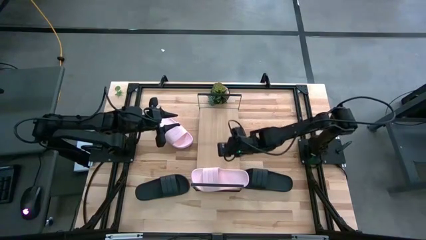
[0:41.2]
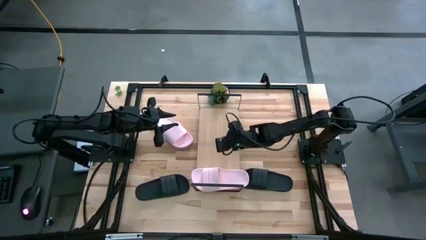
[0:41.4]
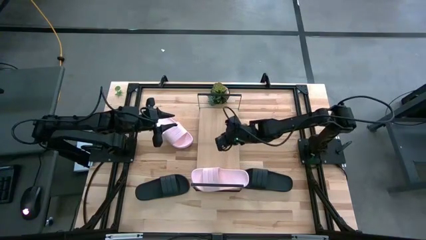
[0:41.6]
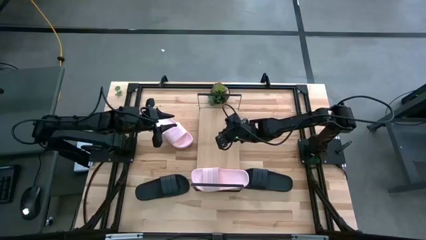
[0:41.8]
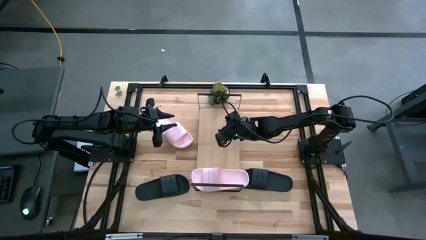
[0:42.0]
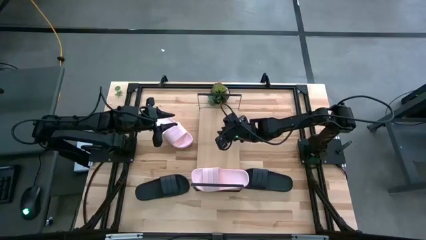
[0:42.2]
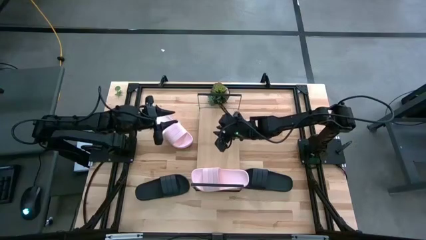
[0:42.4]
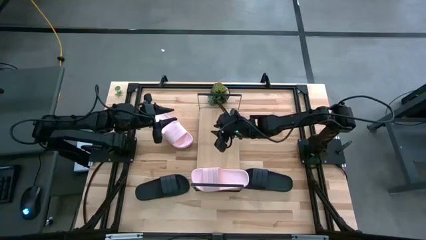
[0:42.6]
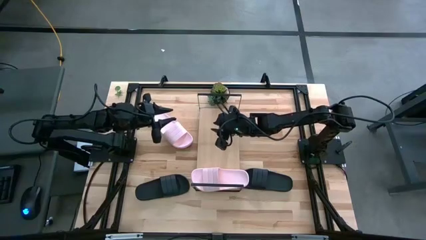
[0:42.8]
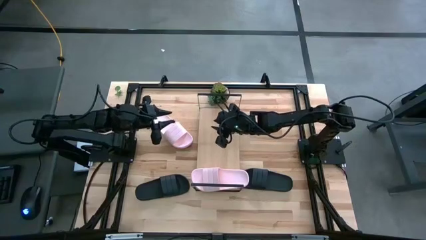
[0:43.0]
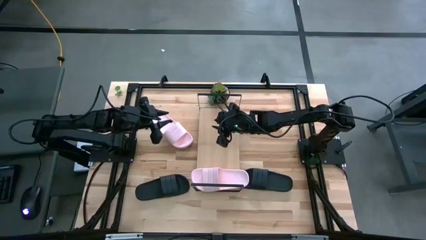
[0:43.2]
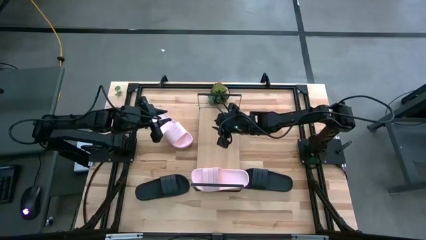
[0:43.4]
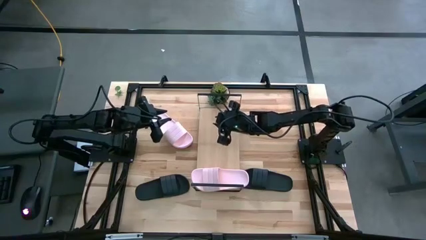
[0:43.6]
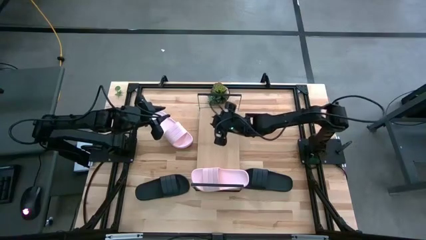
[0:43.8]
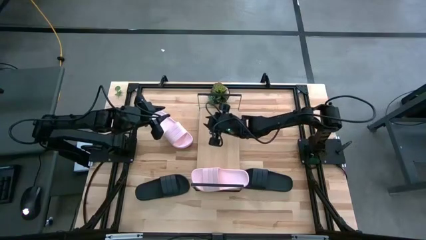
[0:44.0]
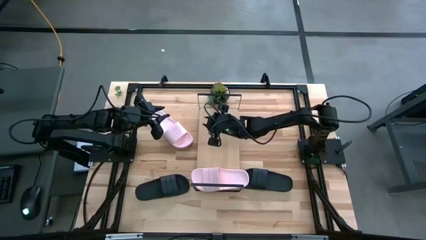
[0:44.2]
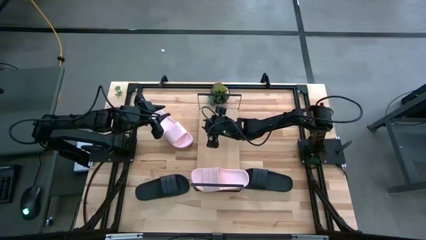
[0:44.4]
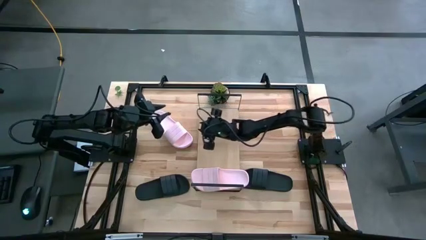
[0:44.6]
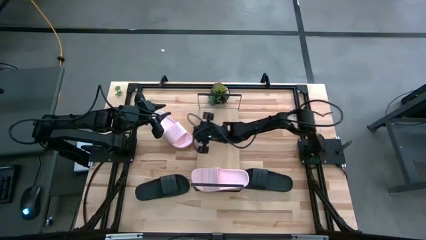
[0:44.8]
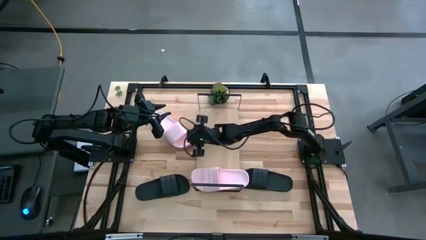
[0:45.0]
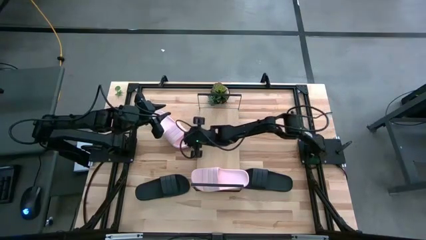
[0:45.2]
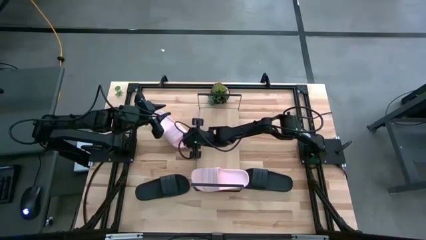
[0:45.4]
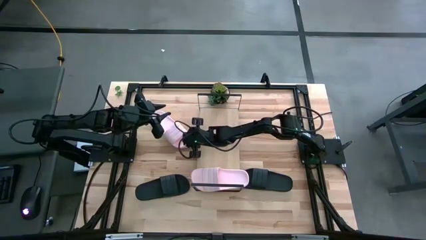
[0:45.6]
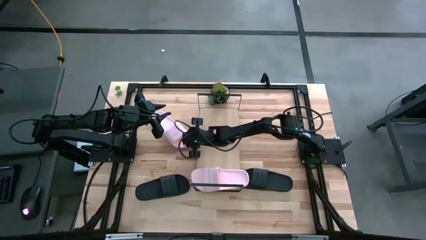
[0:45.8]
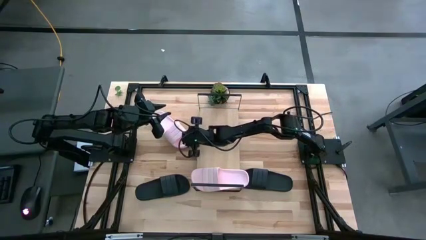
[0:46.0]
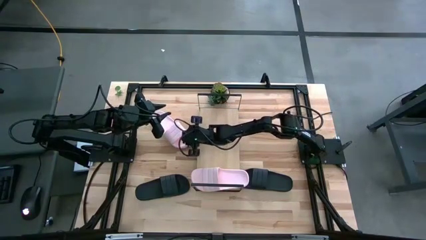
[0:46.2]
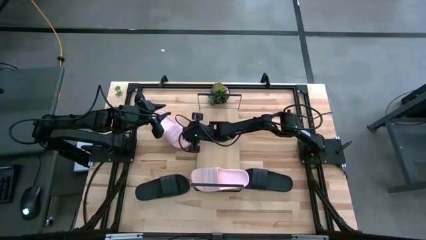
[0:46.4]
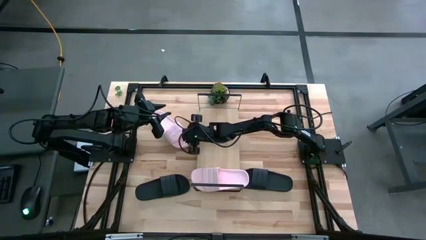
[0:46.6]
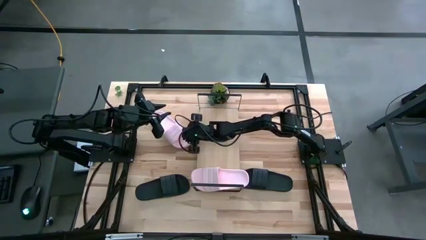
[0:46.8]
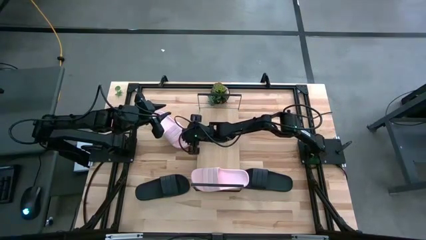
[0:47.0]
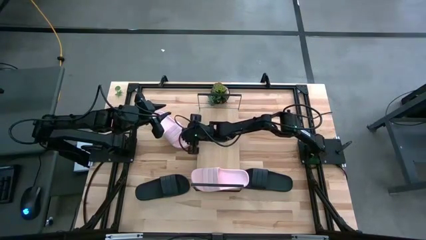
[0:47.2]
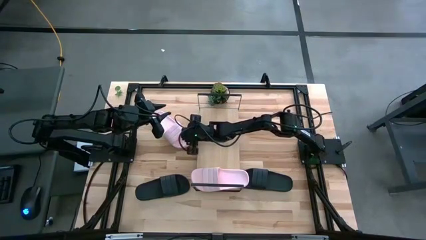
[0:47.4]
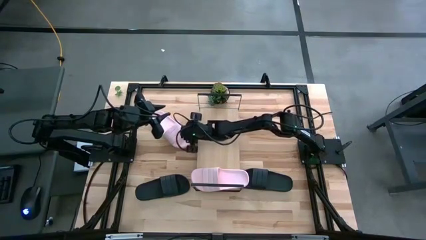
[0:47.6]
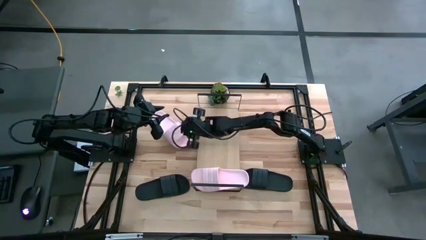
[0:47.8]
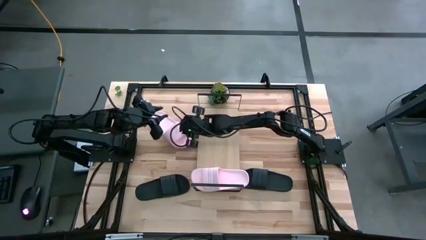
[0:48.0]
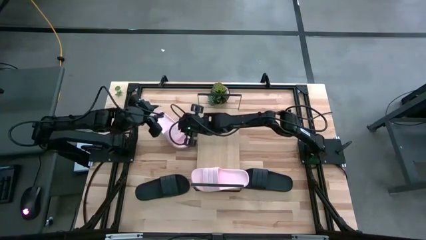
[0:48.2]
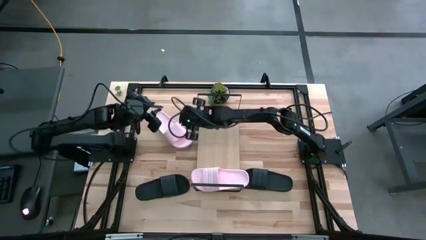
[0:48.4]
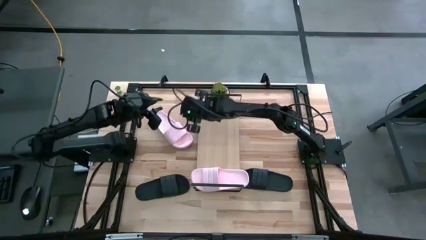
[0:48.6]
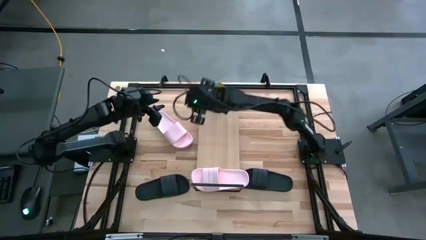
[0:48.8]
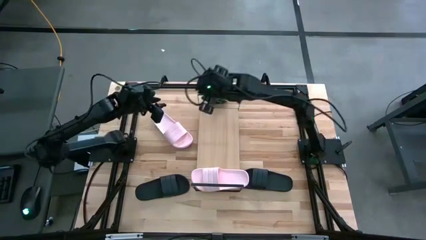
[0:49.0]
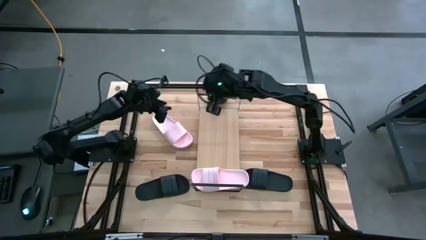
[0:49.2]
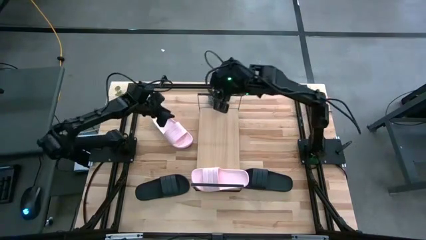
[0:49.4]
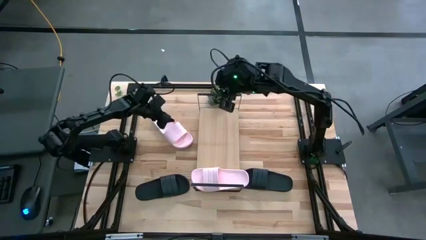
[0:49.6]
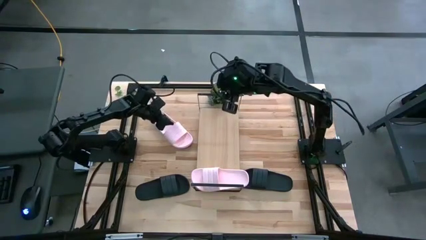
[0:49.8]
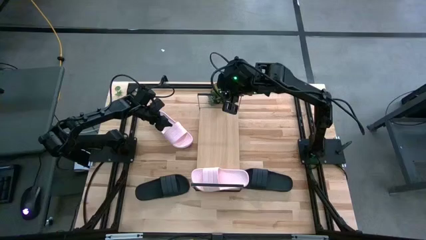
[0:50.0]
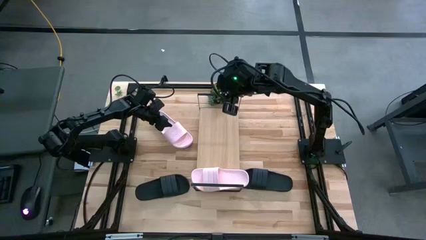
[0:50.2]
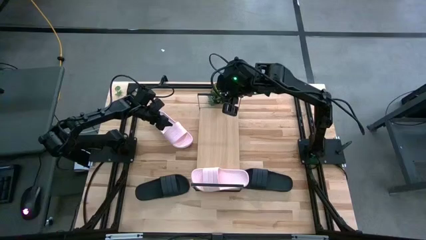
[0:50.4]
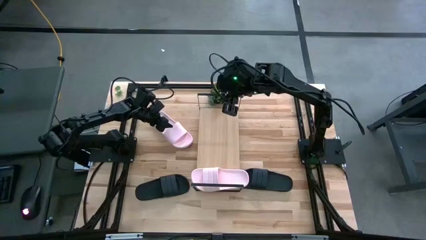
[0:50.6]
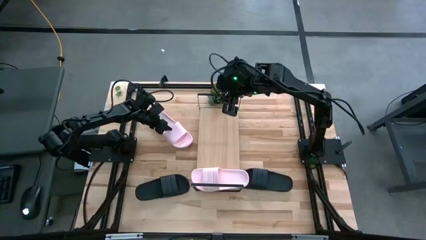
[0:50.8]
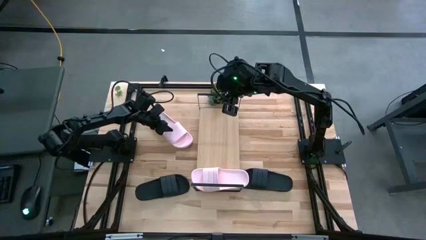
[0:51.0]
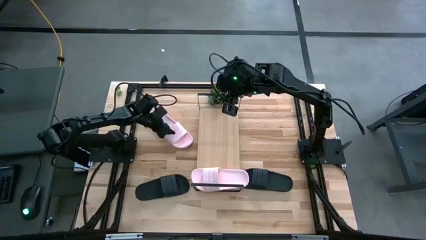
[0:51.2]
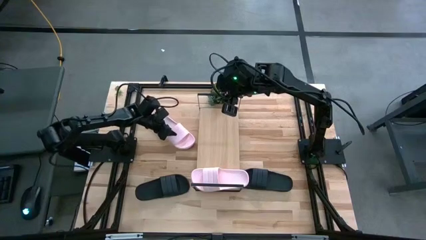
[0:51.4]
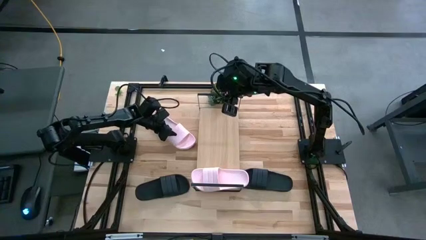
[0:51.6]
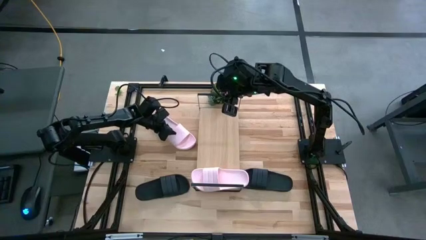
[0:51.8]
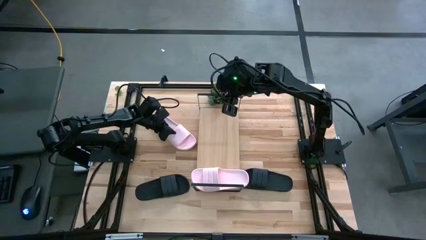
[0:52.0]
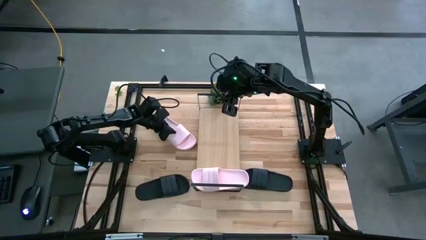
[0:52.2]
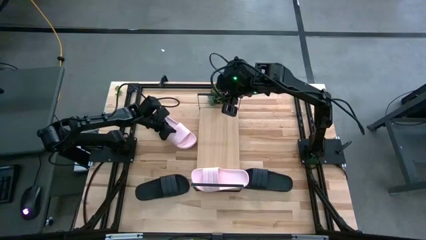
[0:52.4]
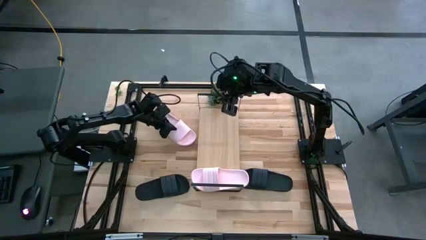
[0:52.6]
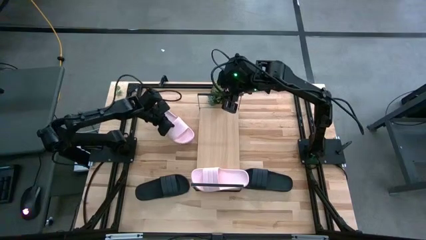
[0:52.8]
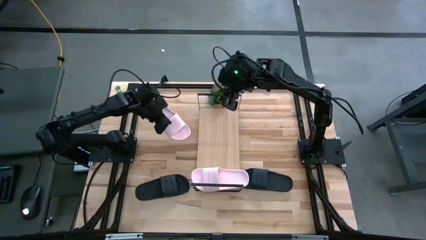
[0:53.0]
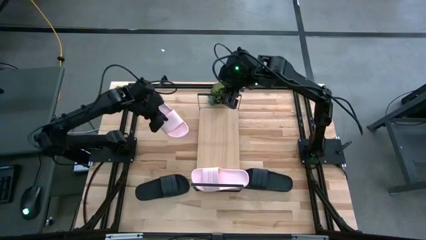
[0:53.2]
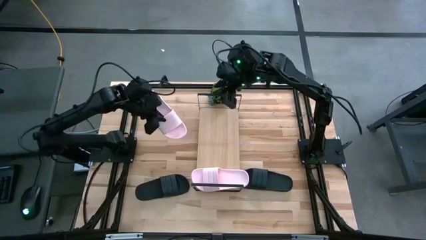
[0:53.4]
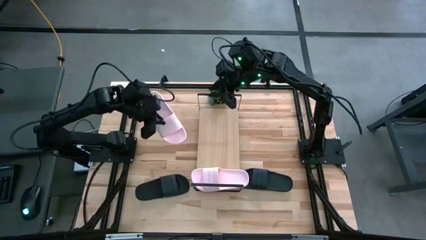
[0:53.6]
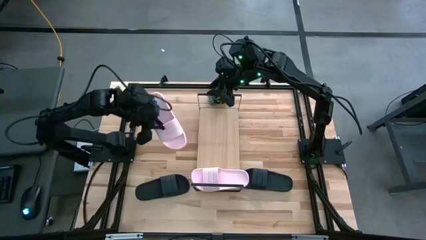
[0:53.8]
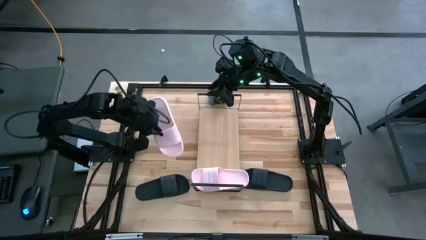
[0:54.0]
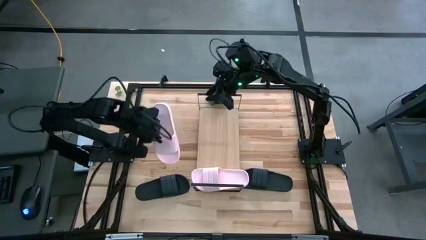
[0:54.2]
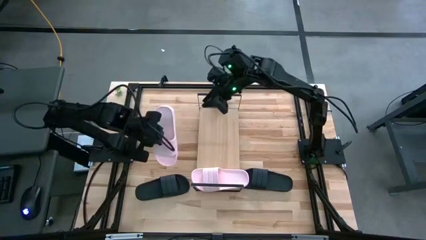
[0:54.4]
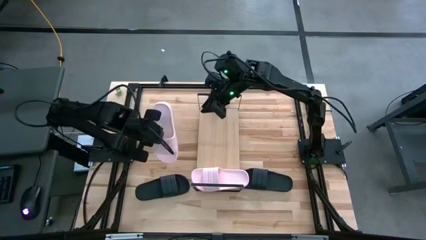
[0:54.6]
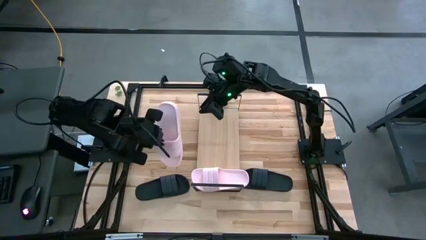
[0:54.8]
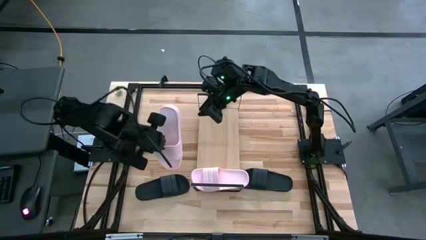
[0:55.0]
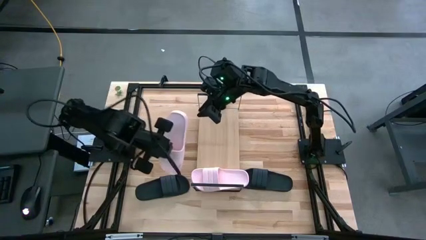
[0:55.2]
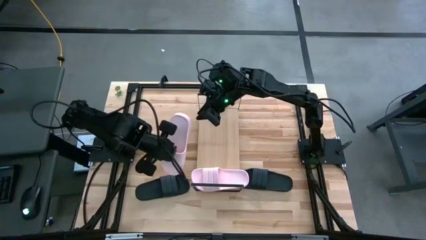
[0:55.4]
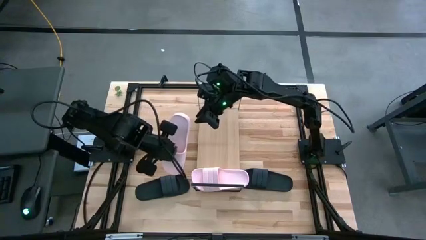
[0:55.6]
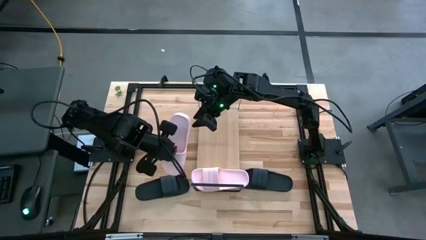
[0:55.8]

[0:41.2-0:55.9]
Task: Pick and place slides into the shelf
Put the pink slide on the shelf
